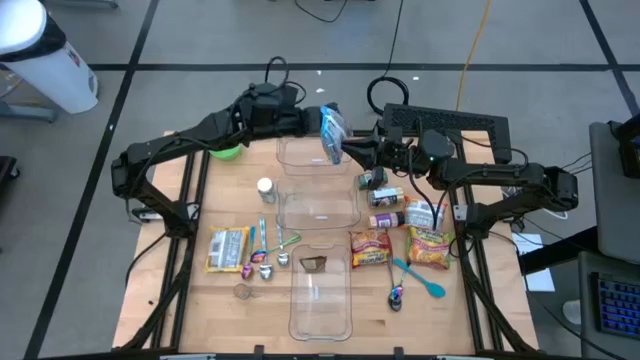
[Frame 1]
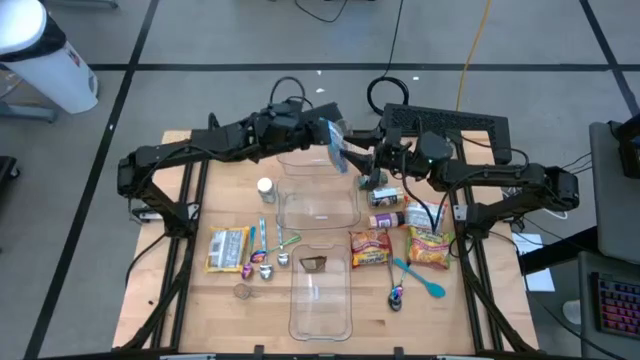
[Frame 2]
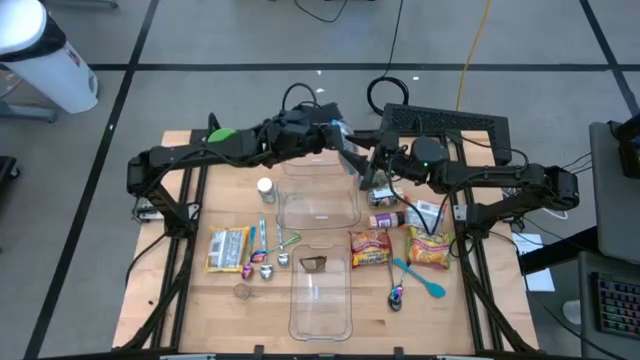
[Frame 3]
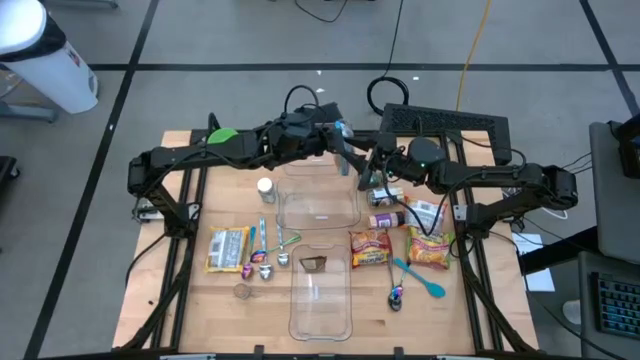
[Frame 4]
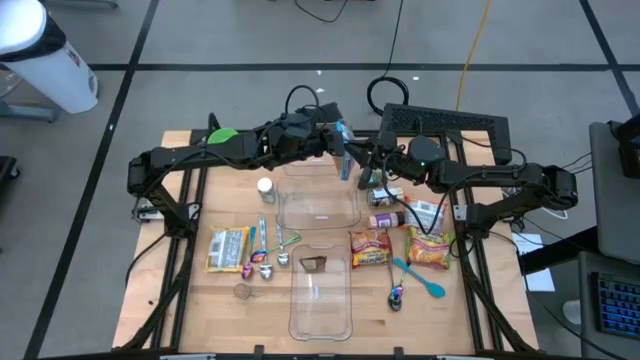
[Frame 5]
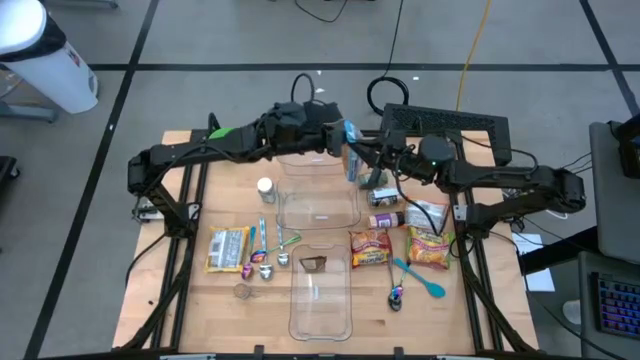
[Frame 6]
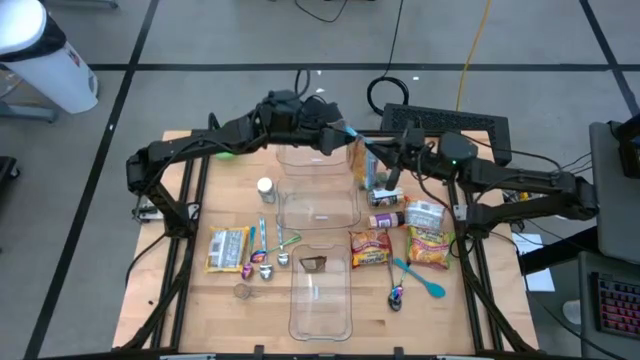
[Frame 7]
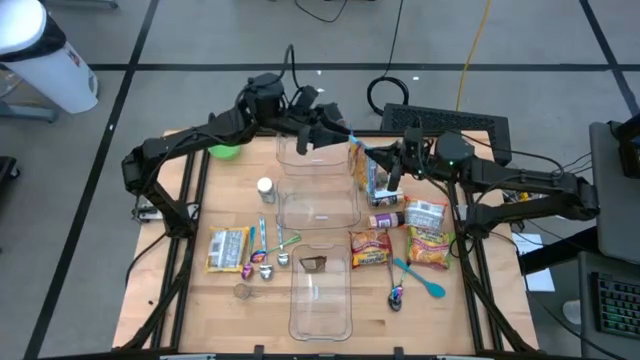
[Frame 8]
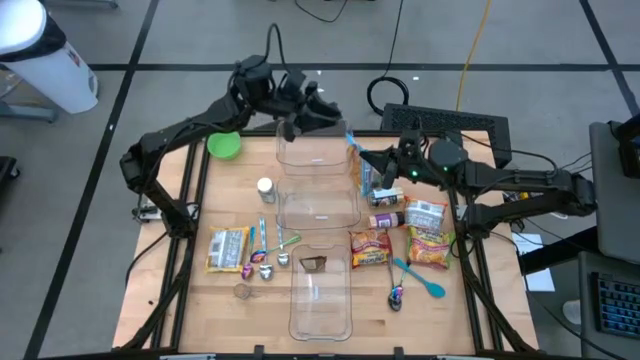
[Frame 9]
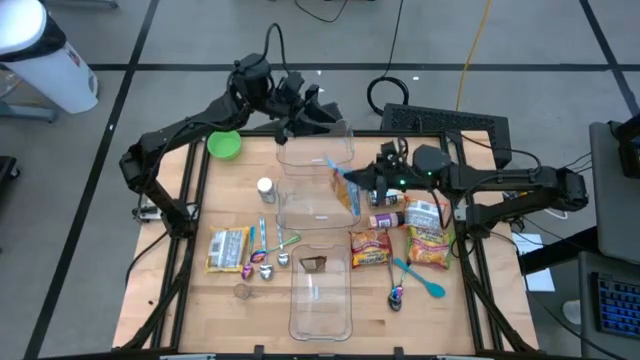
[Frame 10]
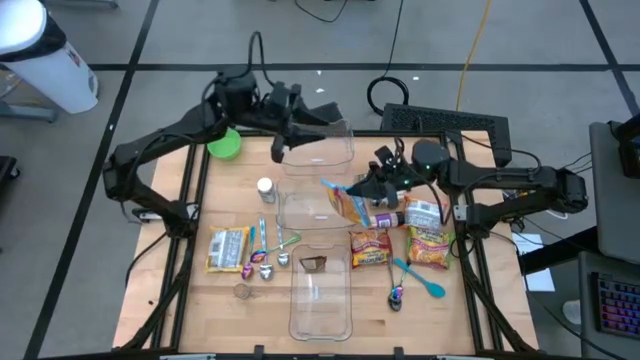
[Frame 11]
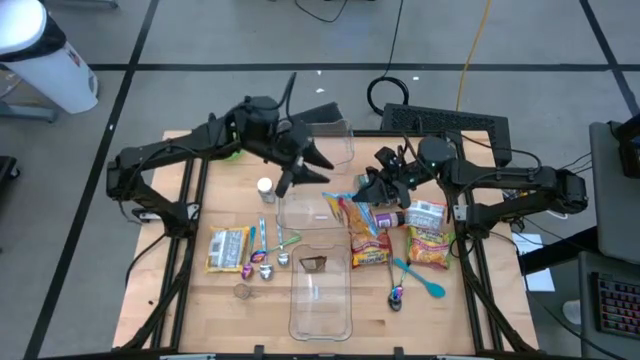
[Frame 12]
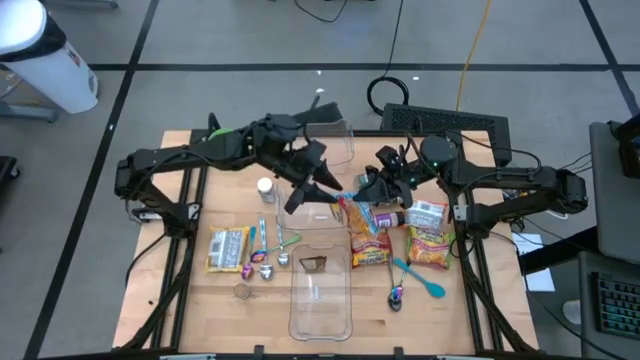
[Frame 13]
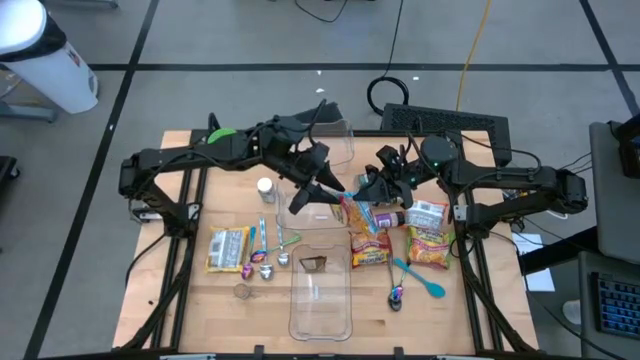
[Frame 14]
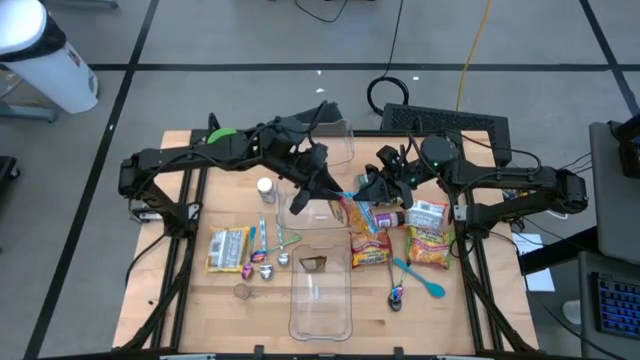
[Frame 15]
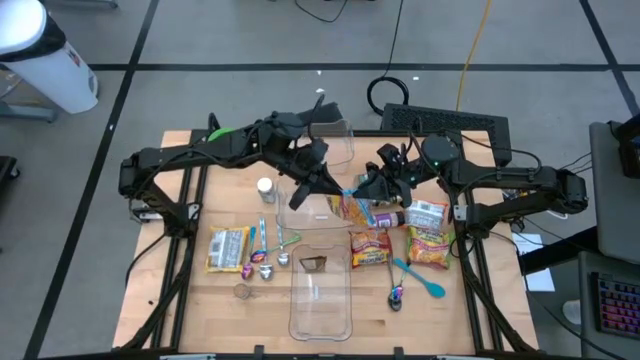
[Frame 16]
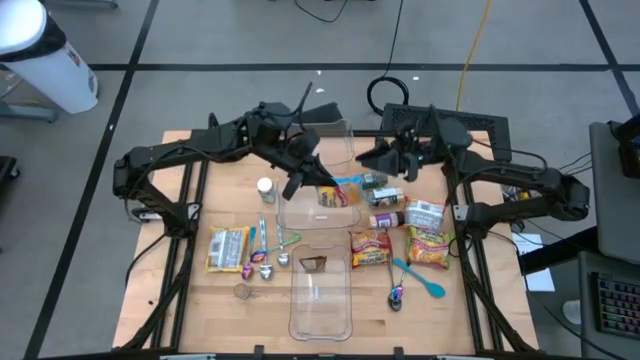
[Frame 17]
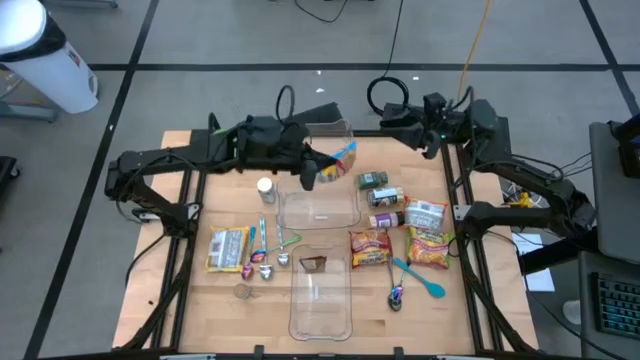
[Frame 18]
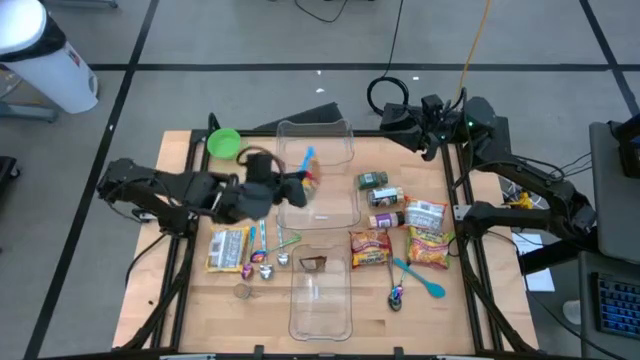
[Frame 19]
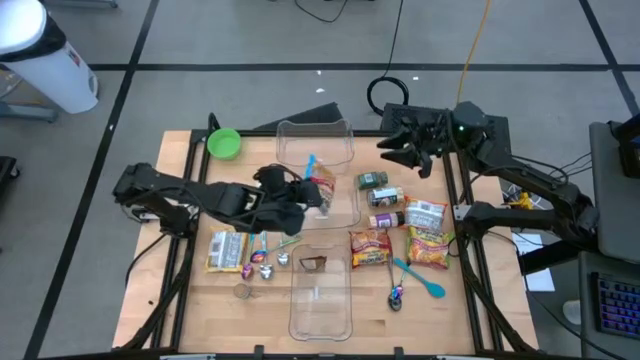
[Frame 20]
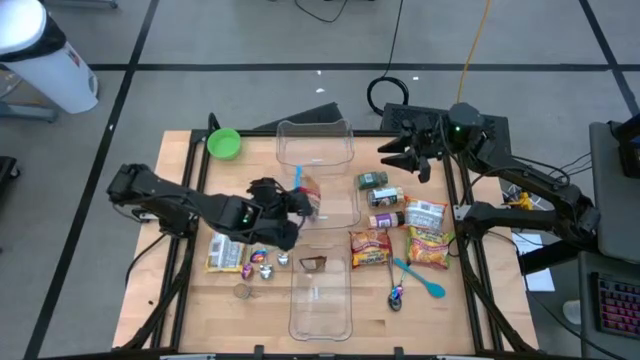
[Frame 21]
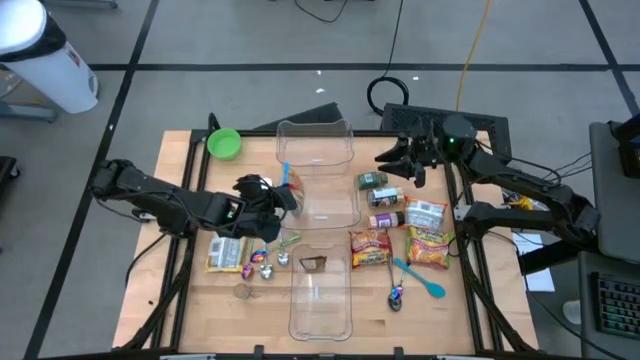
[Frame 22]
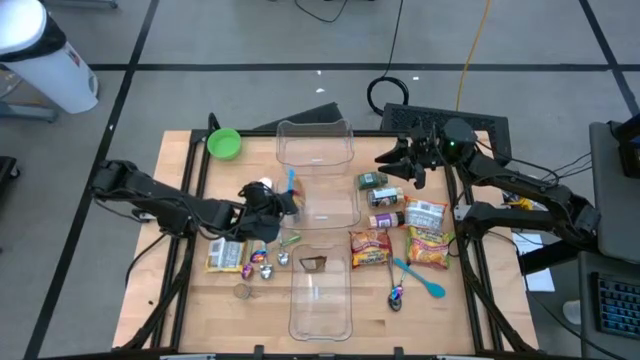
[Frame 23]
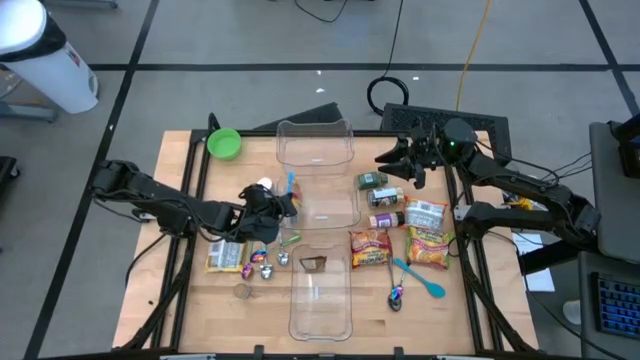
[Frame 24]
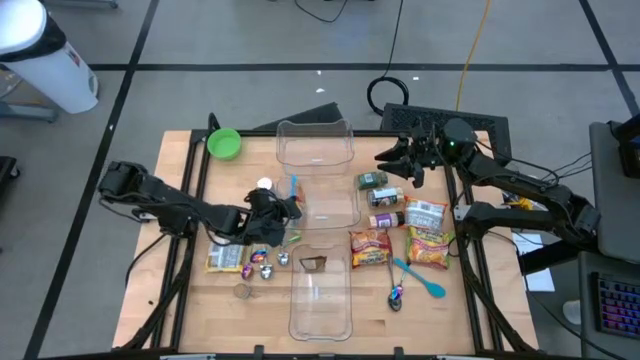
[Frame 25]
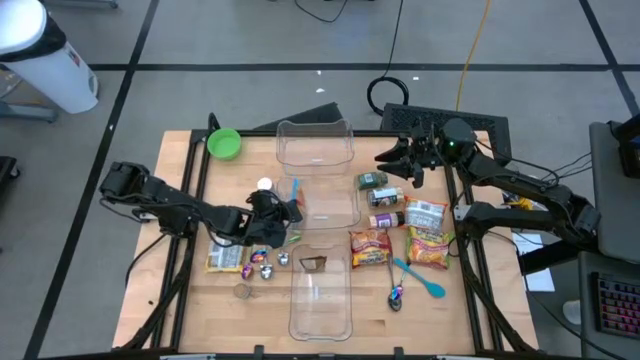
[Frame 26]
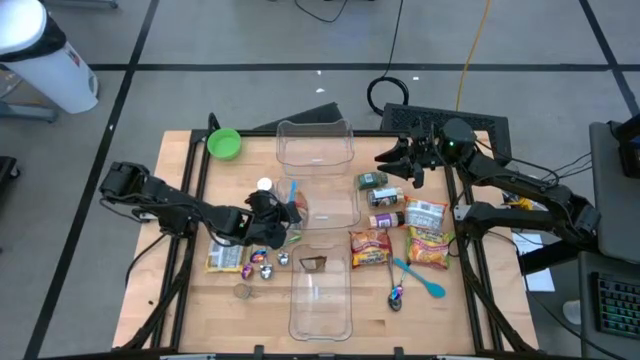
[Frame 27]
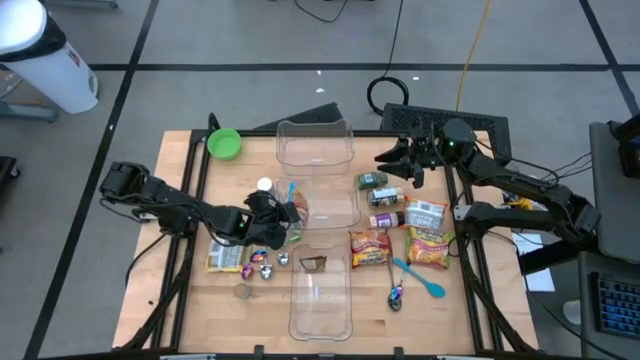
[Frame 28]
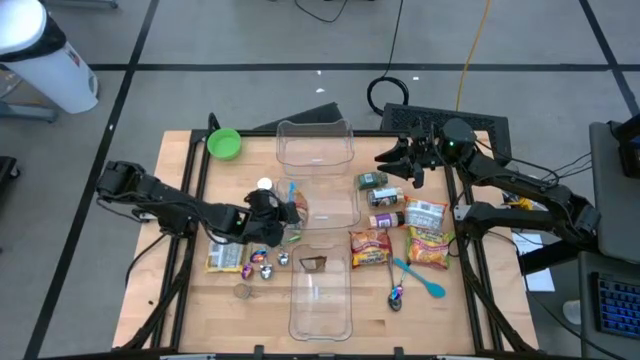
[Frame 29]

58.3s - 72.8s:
Task: Pick & Place Food Item
Put the blue noodle pack into the middle transparent bin

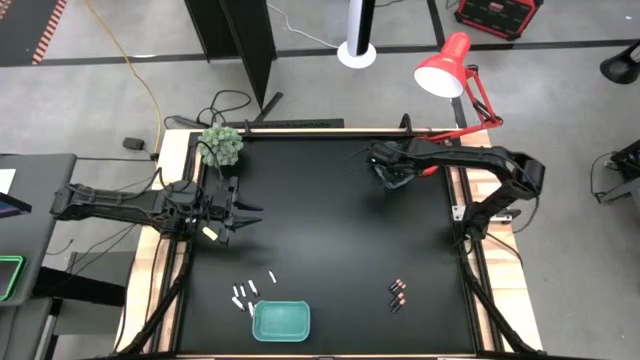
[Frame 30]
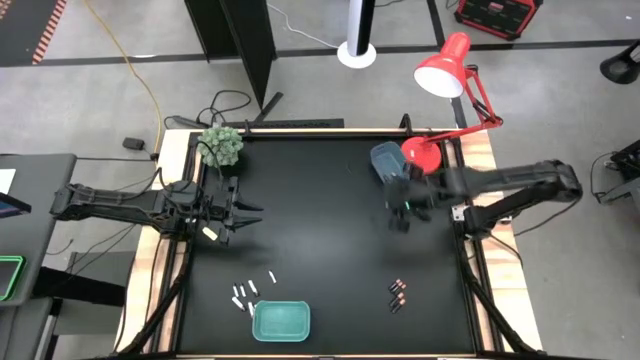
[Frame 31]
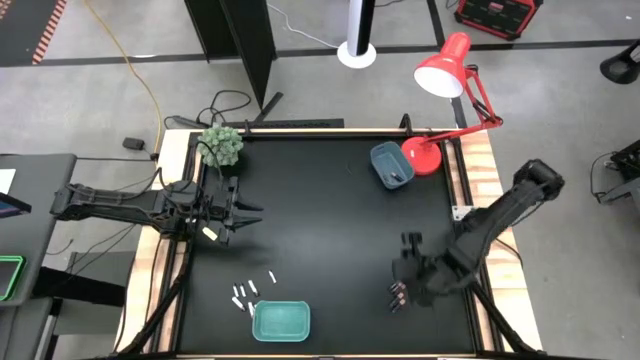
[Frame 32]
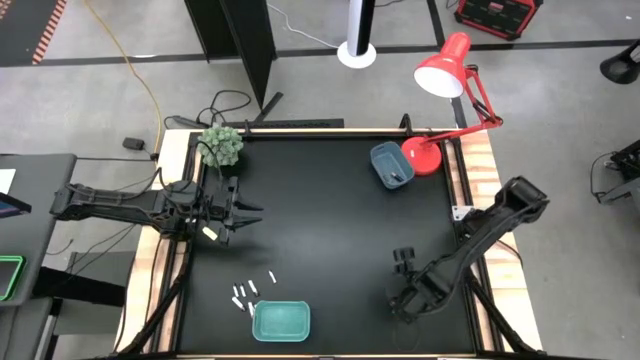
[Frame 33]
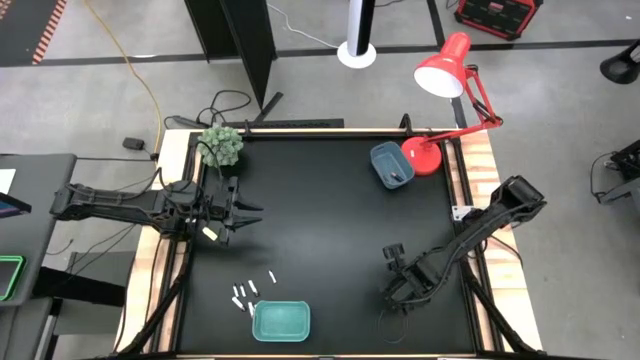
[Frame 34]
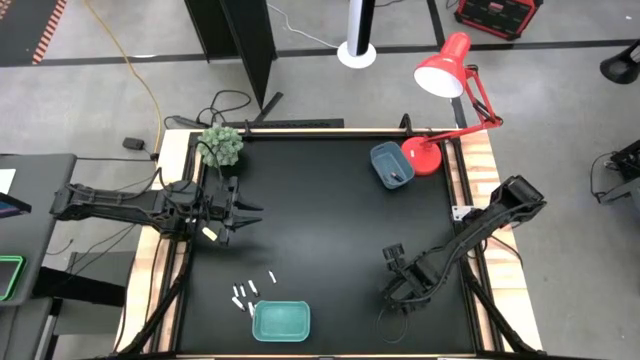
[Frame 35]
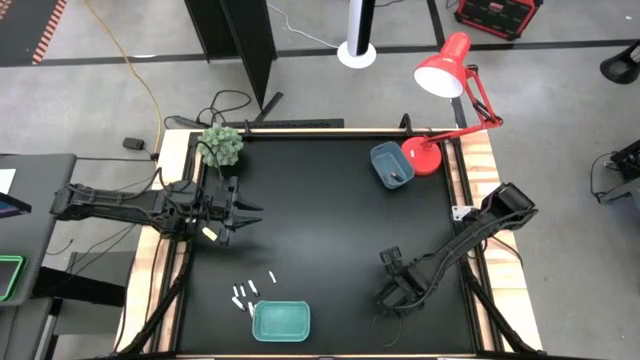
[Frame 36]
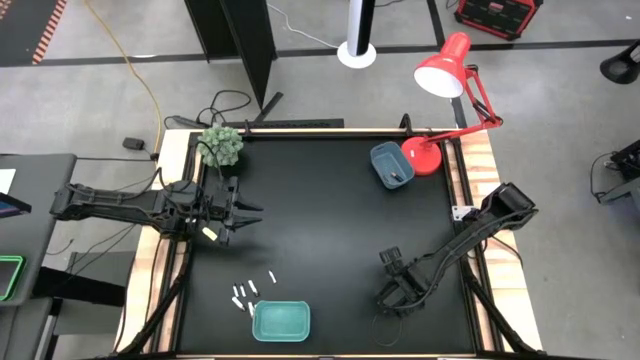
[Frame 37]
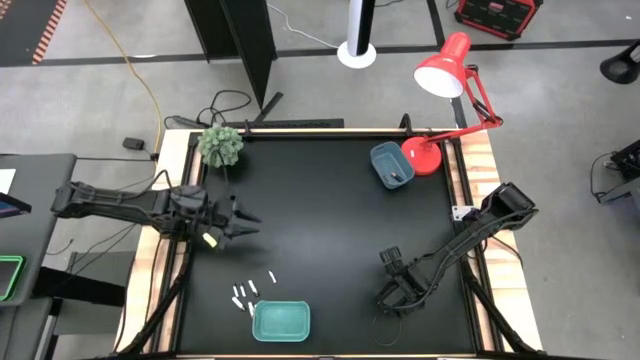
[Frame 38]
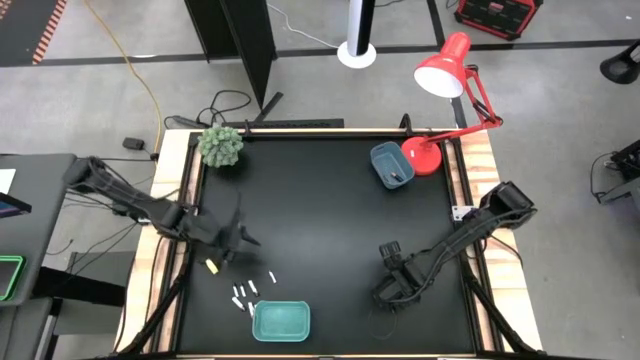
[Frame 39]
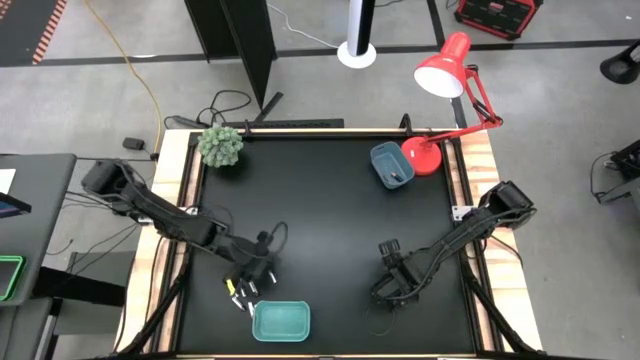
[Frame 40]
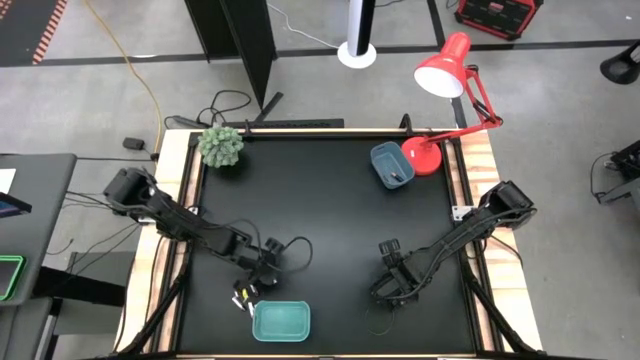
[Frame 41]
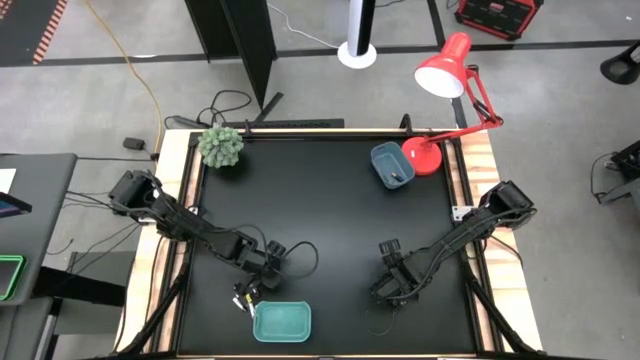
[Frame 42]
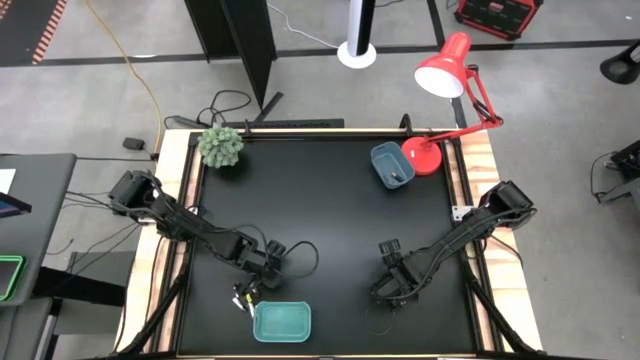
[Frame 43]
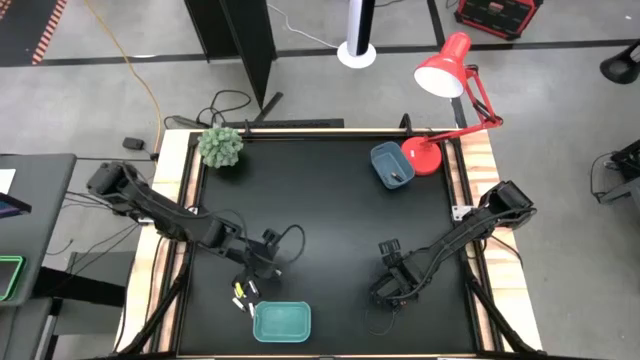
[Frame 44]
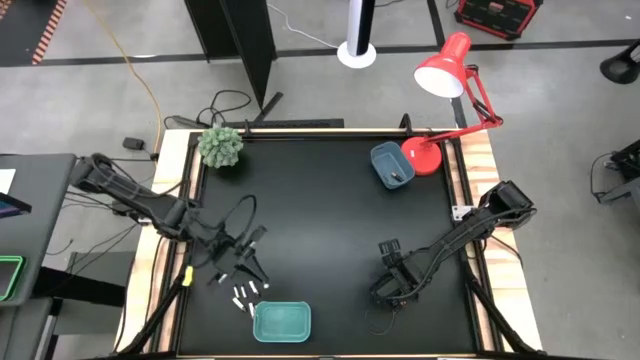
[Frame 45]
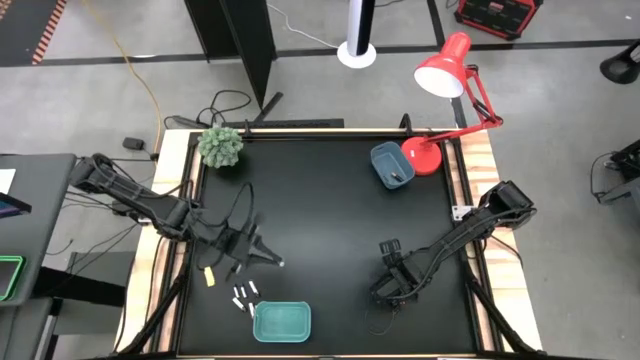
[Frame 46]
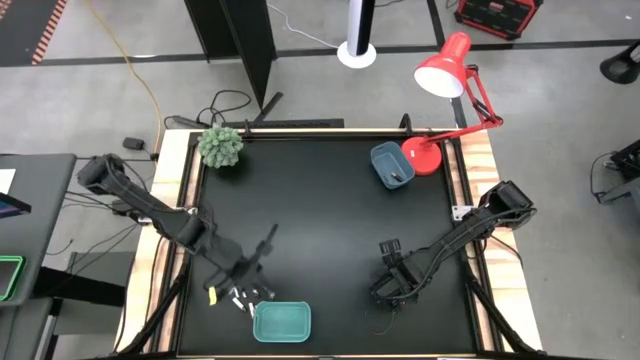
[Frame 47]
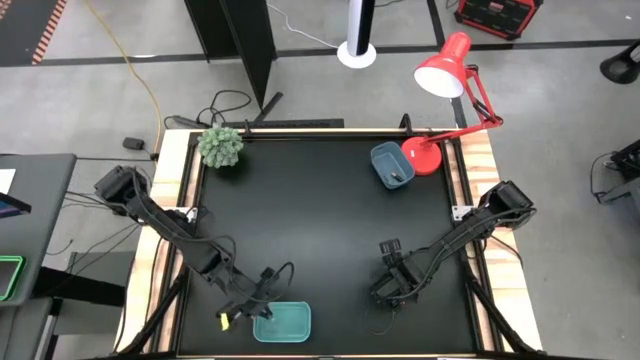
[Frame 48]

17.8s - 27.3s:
Task: Sort batteries
Put the silver battery into the green bin
